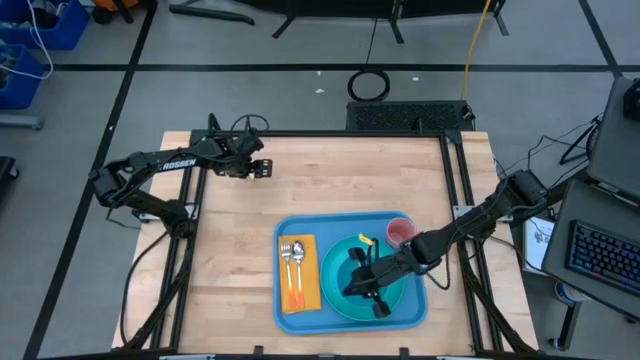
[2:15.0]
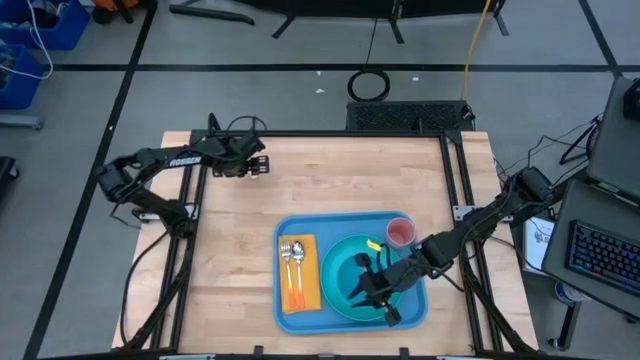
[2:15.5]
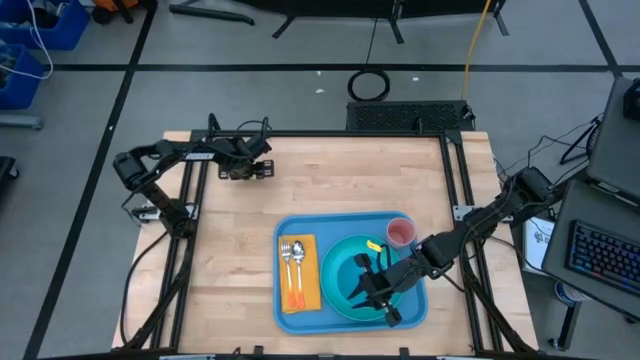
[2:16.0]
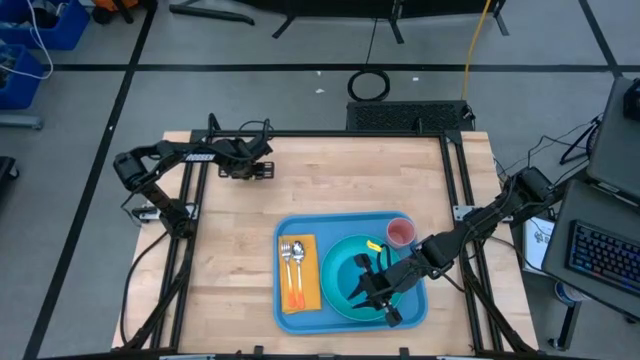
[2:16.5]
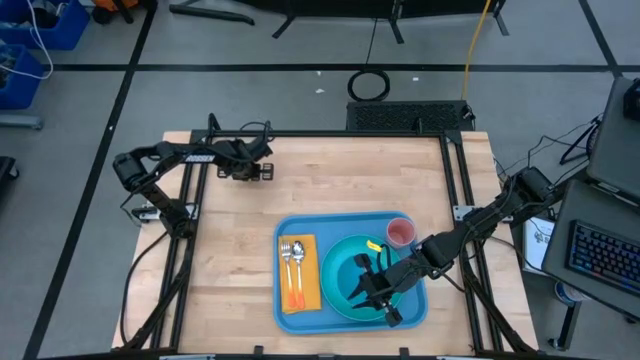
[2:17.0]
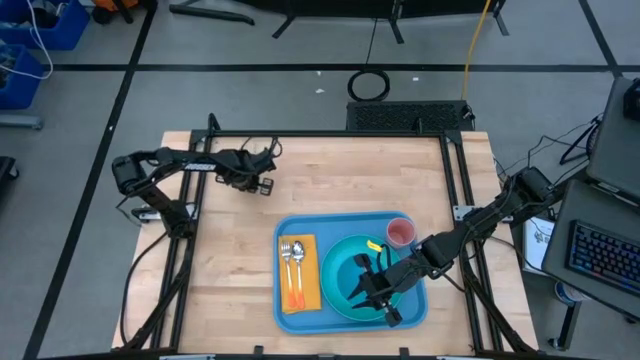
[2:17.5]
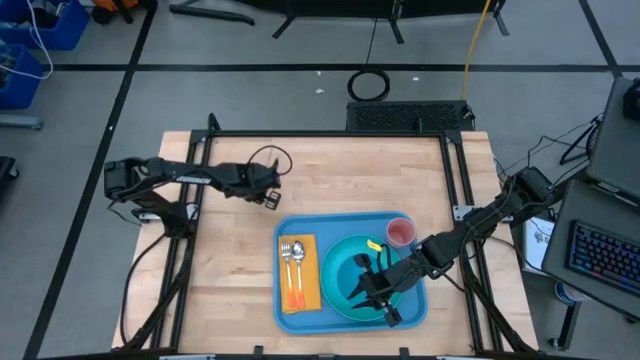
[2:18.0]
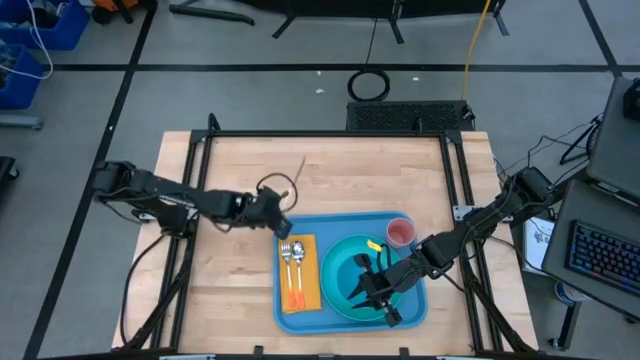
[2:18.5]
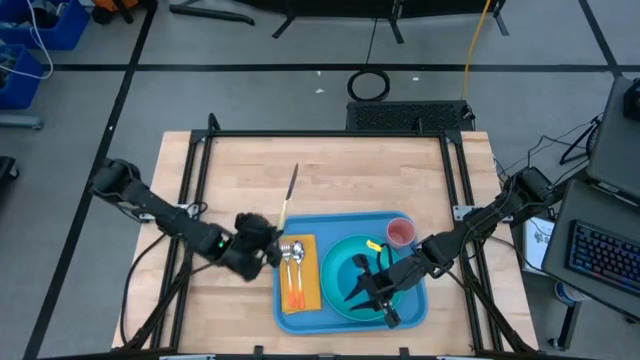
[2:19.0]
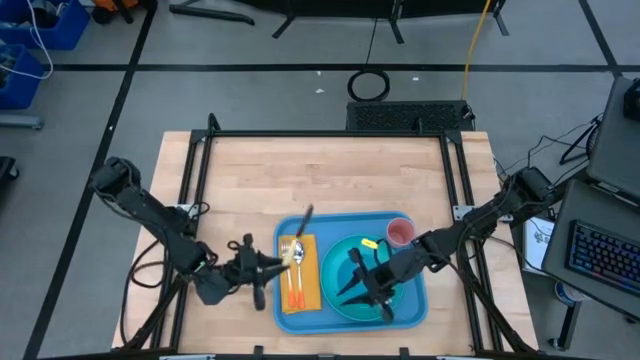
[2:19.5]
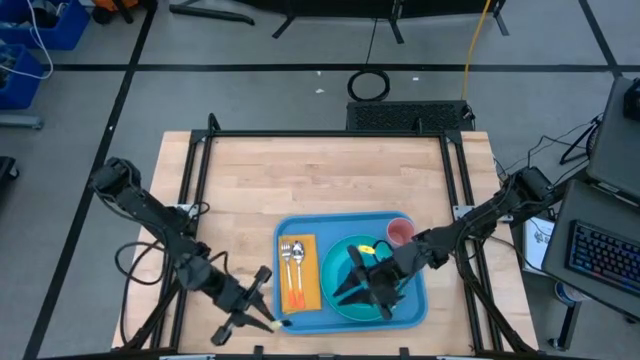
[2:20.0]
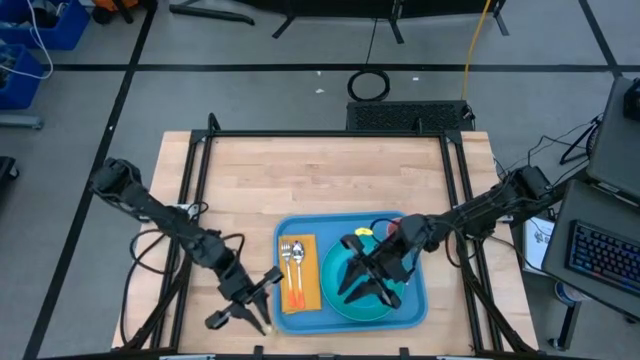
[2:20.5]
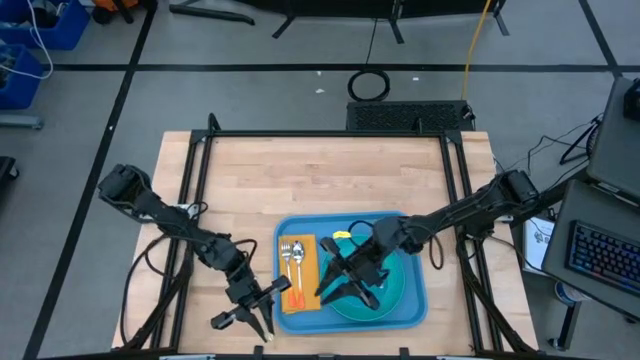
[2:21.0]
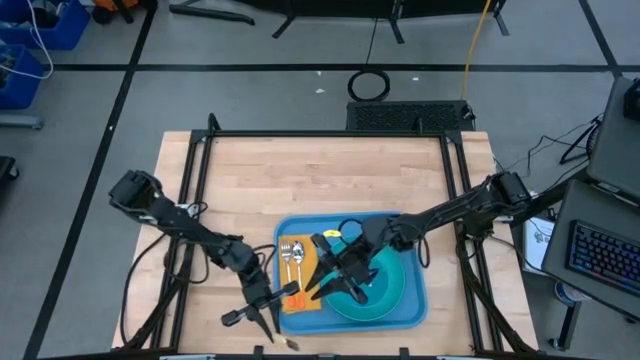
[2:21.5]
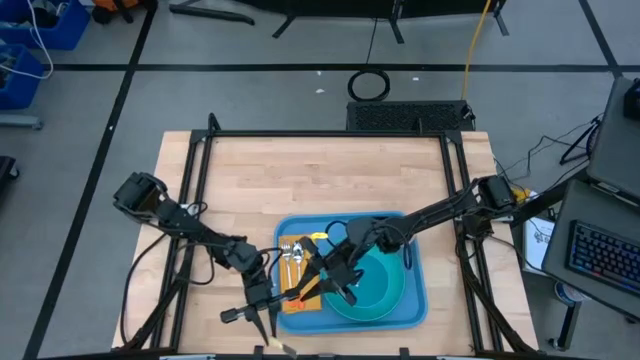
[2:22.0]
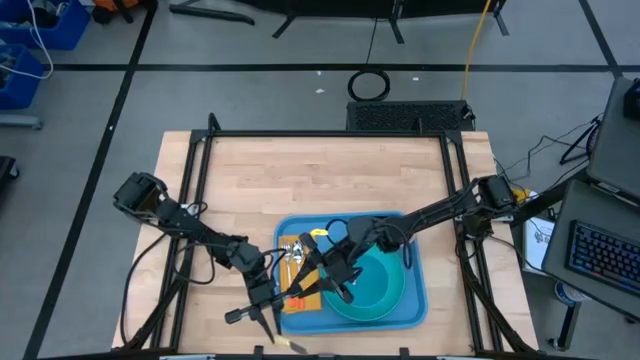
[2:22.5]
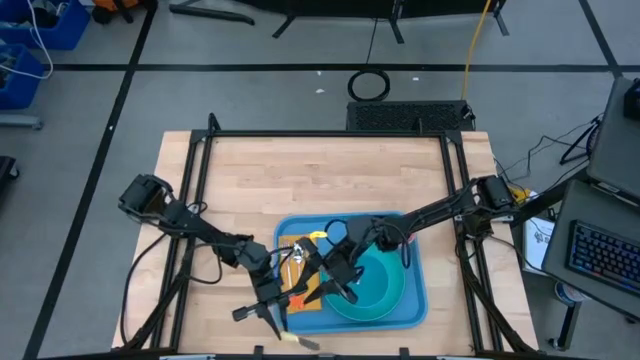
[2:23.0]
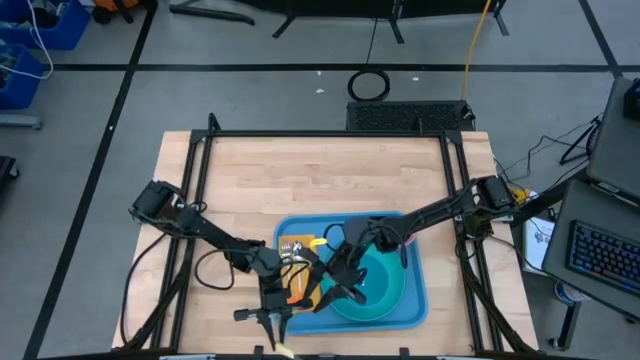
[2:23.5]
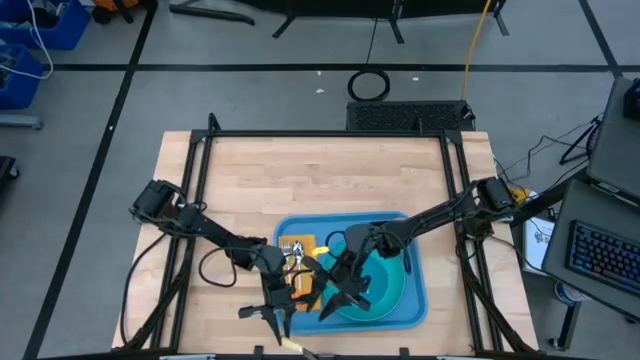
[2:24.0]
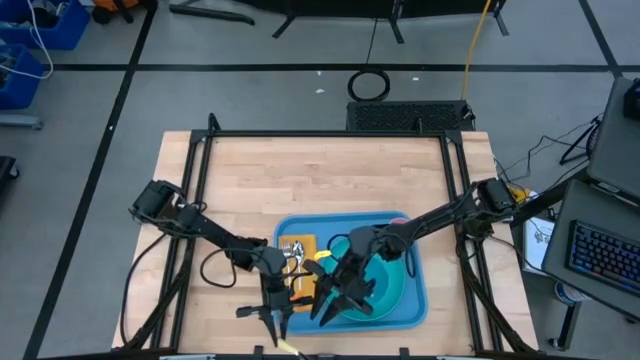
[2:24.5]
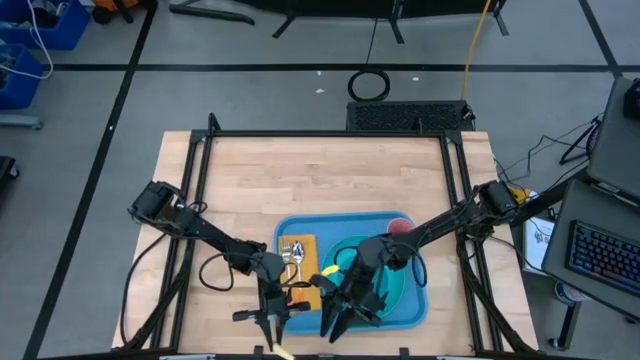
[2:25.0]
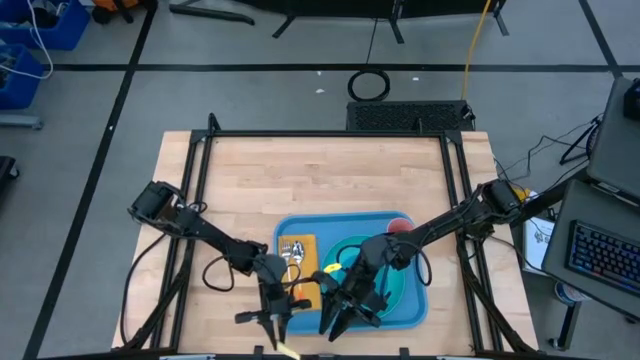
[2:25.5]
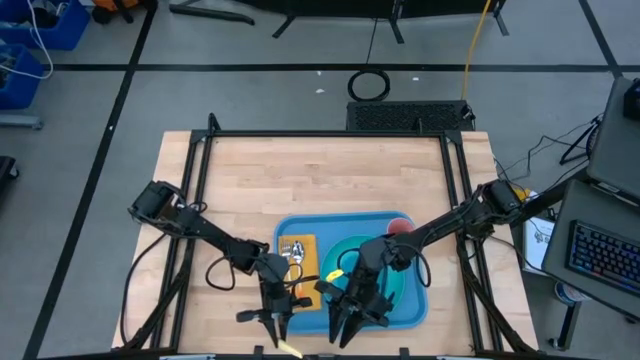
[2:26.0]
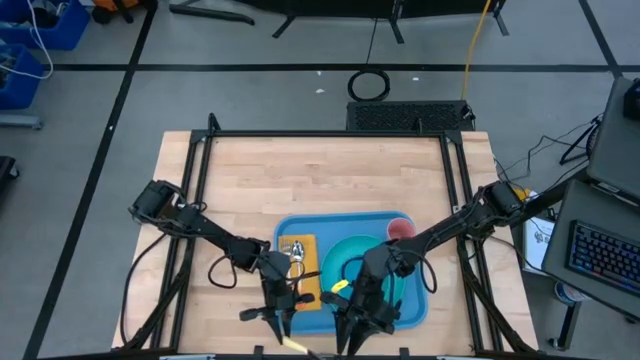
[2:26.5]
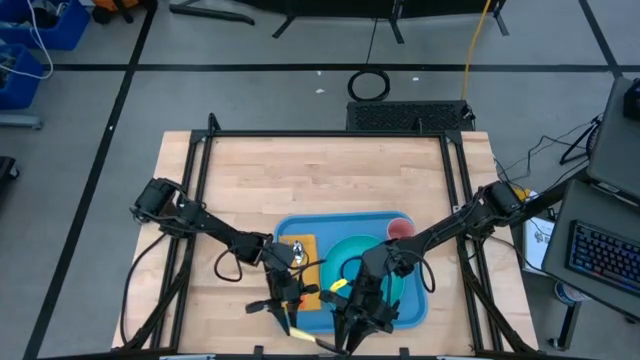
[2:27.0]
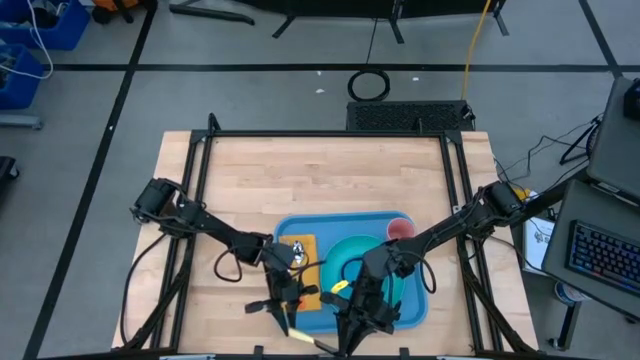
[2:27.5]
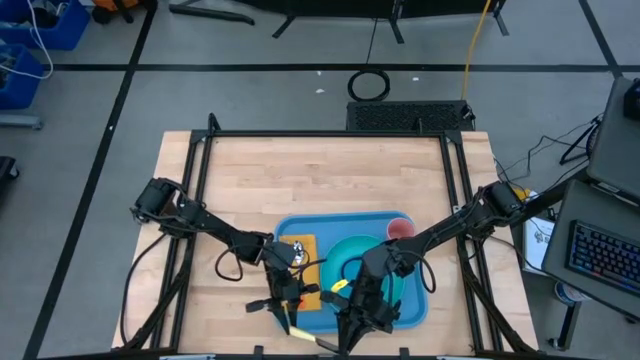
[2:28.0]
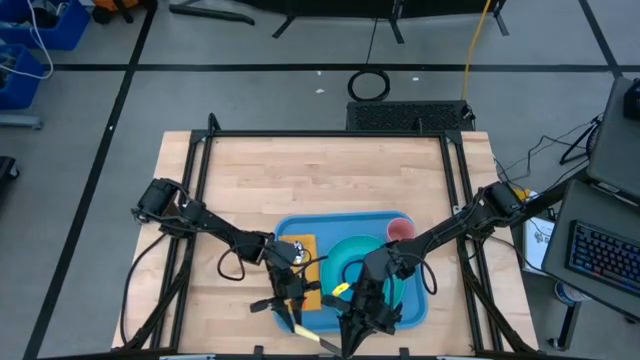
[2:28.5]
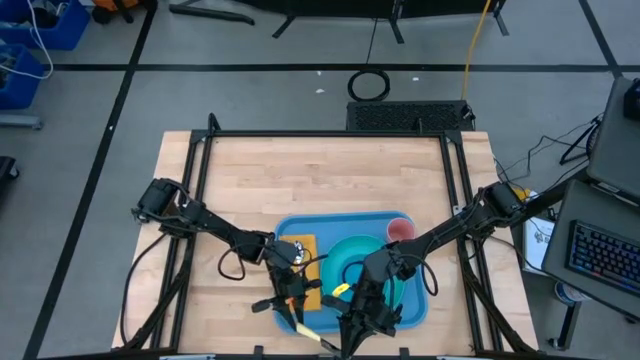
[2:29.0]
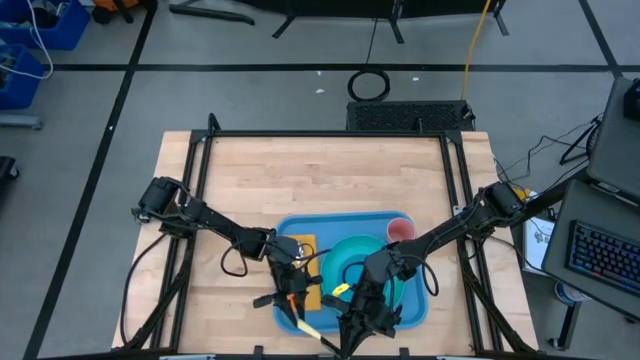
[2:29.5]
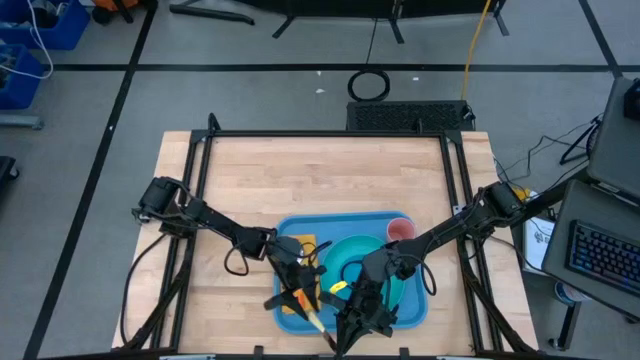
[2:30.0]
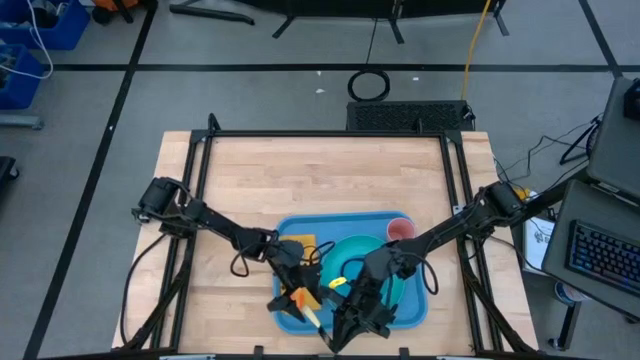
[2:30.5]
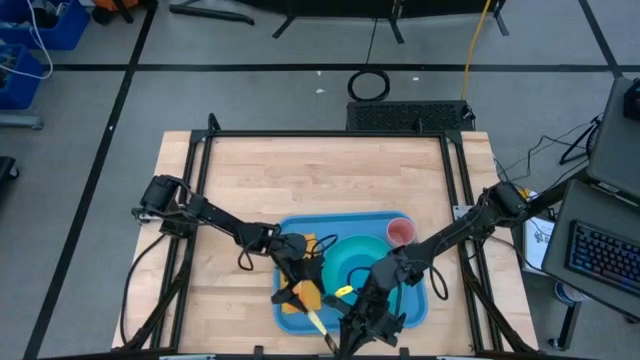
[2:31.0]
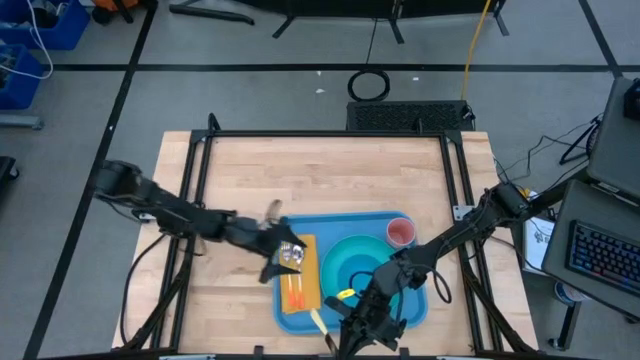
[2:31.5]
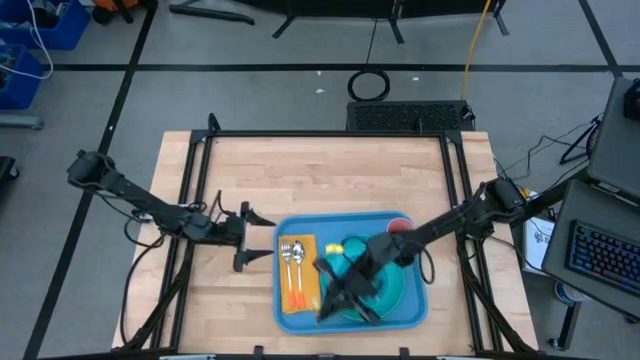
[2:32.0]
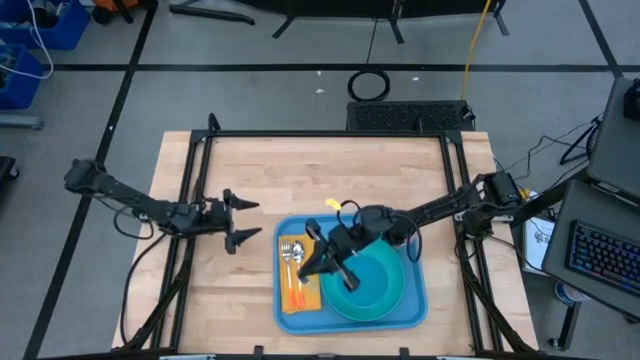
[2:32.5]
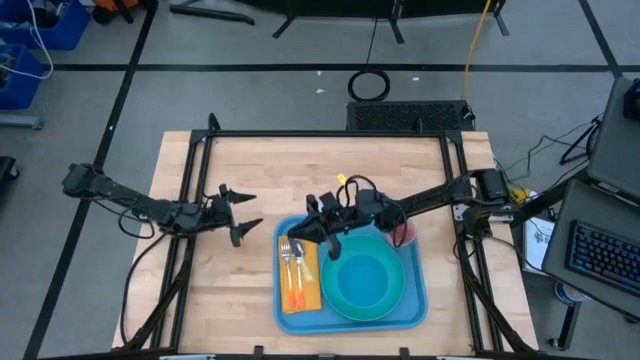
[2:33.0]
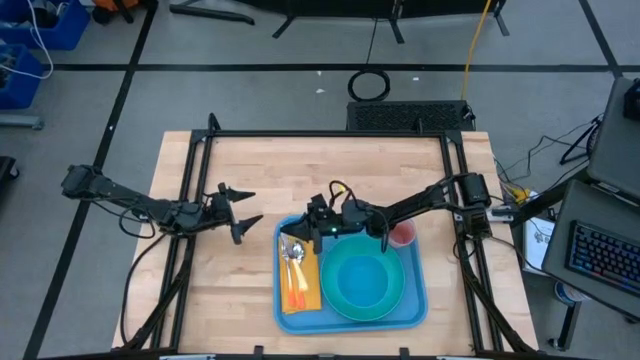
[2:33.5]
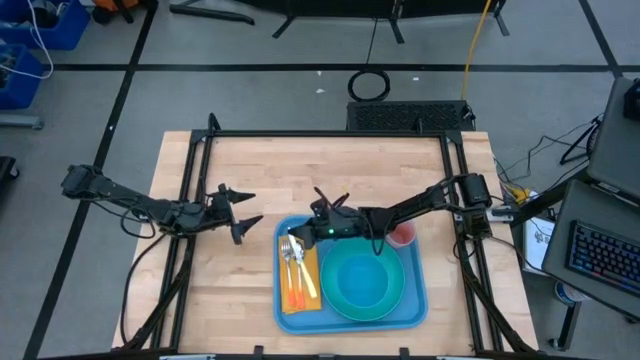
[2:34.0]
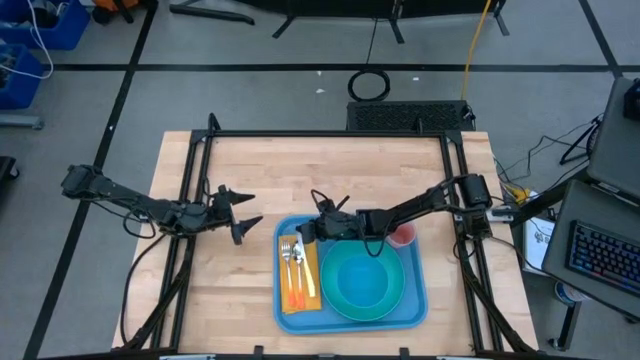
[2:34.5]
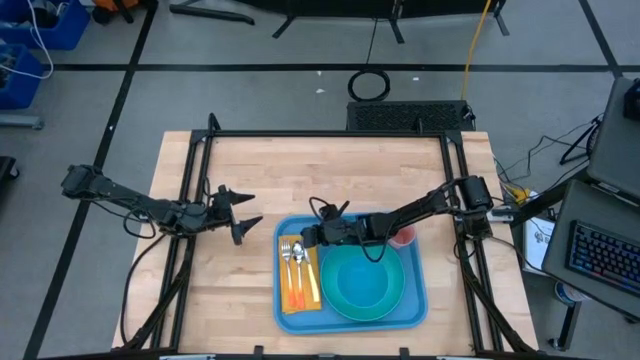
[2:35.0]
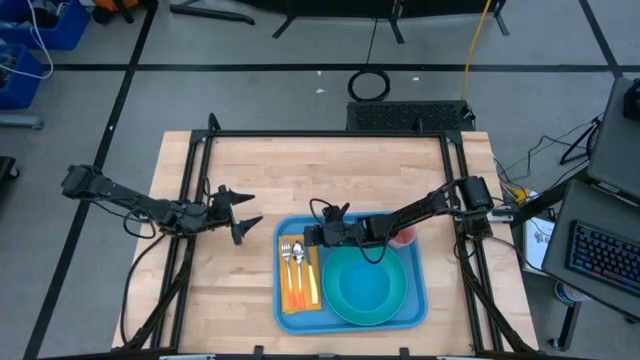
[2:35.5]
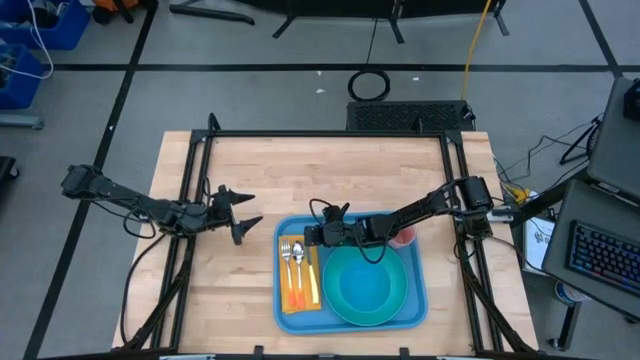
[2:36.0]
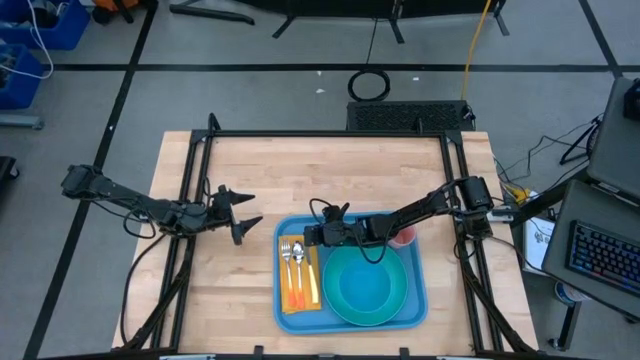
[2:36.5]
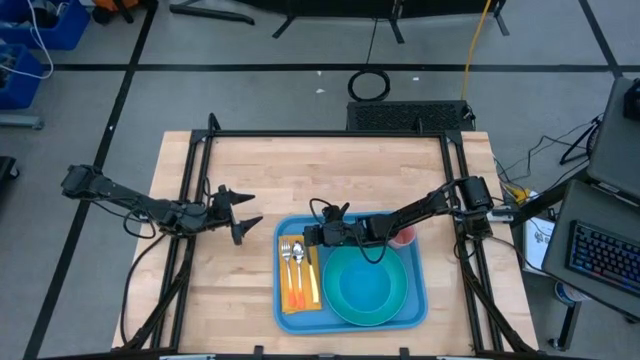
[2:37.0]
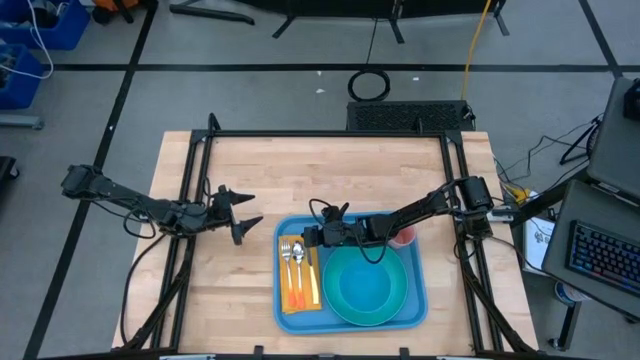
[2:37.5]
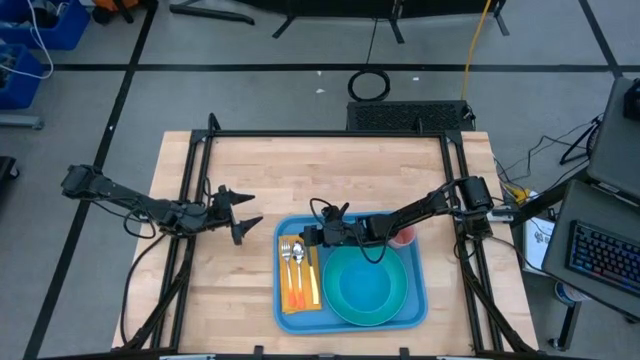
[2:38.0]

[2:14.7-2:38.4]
Task: Set up tray
Put the light yellow knife on the yellow napkin to the right of the orange spoon
